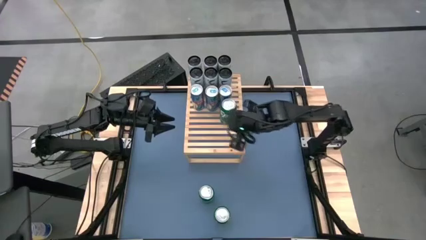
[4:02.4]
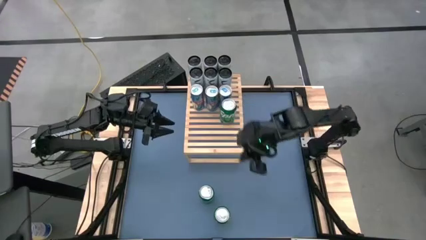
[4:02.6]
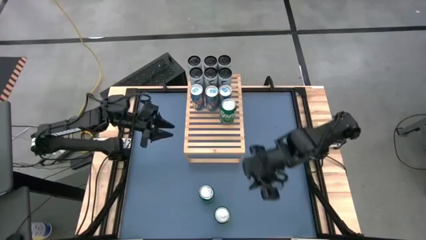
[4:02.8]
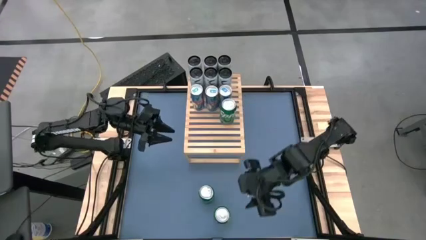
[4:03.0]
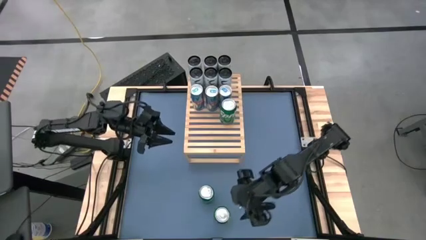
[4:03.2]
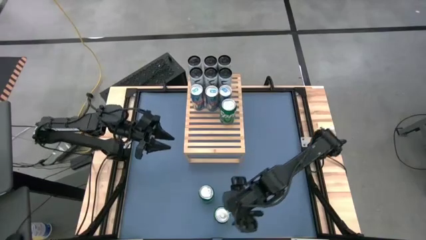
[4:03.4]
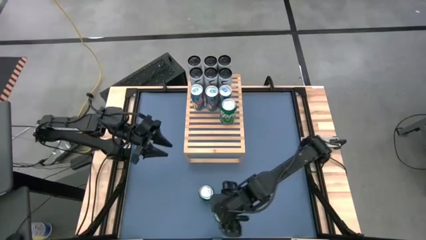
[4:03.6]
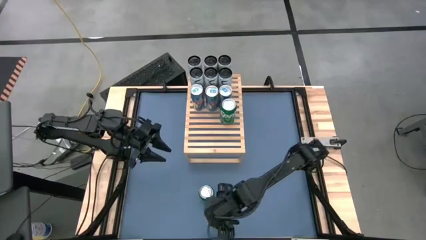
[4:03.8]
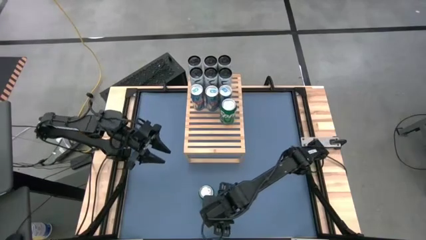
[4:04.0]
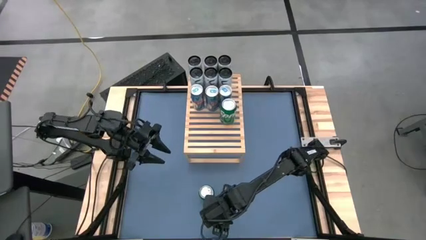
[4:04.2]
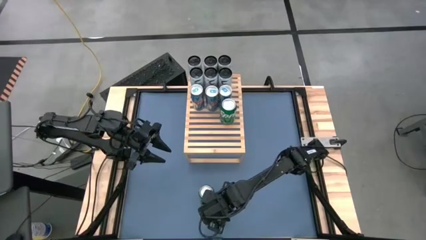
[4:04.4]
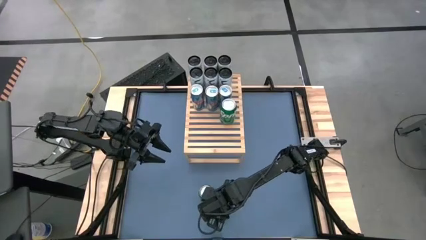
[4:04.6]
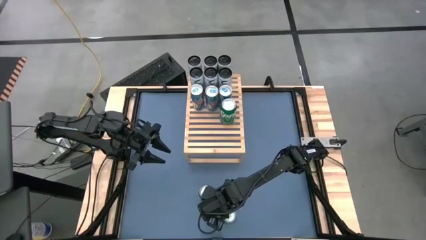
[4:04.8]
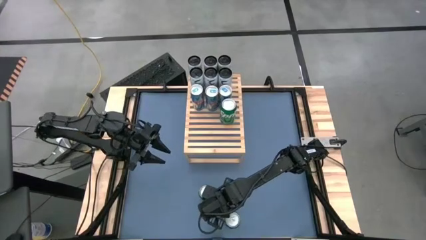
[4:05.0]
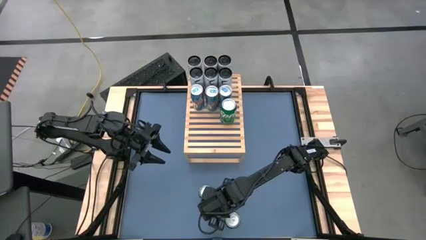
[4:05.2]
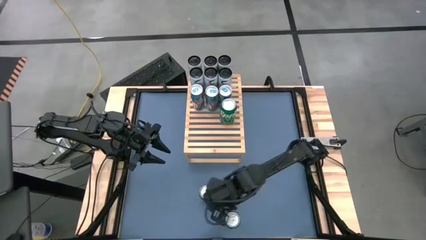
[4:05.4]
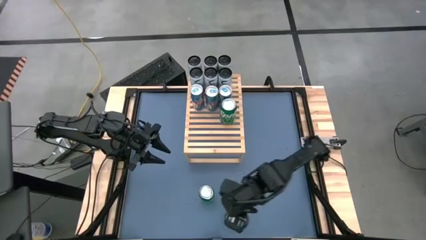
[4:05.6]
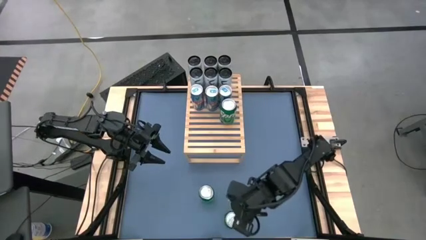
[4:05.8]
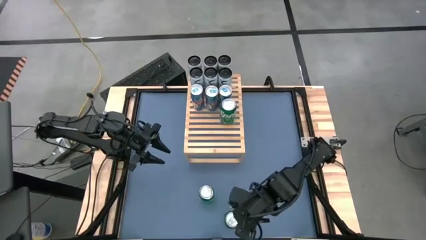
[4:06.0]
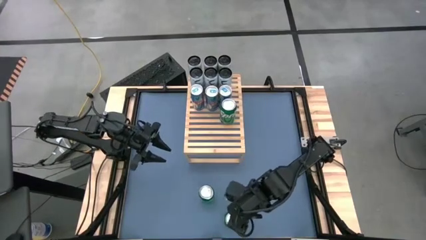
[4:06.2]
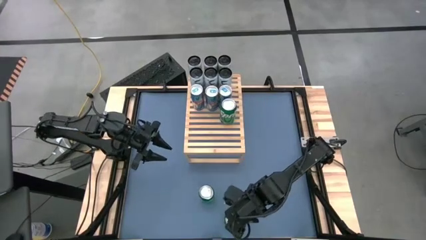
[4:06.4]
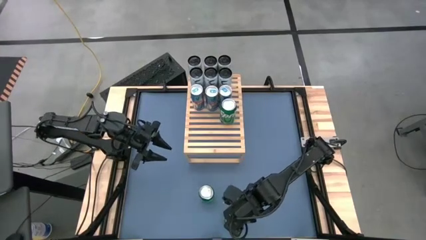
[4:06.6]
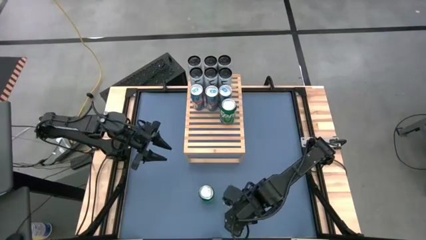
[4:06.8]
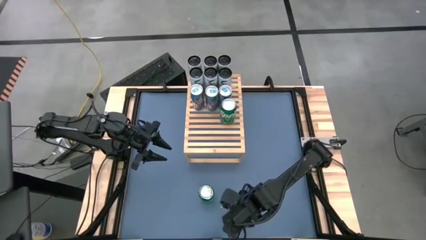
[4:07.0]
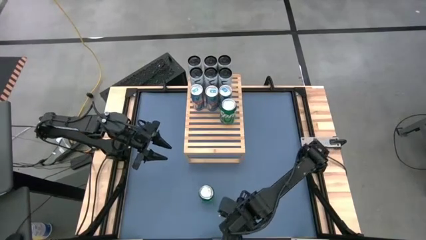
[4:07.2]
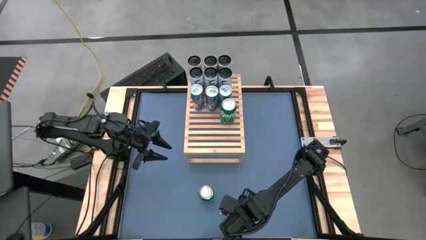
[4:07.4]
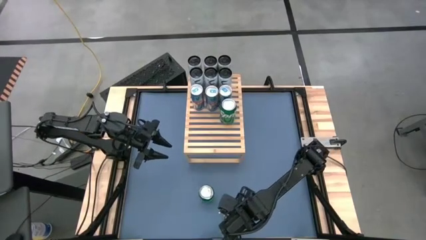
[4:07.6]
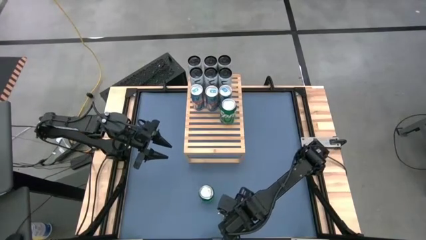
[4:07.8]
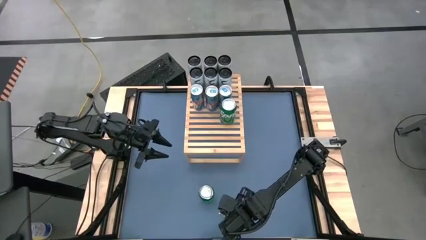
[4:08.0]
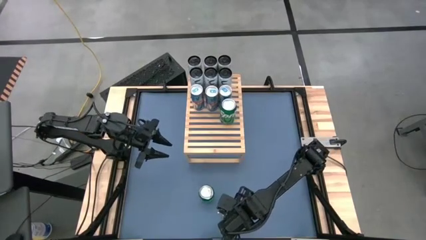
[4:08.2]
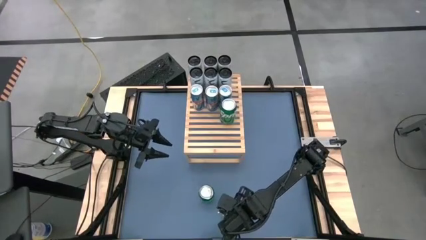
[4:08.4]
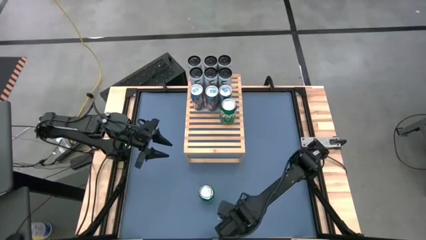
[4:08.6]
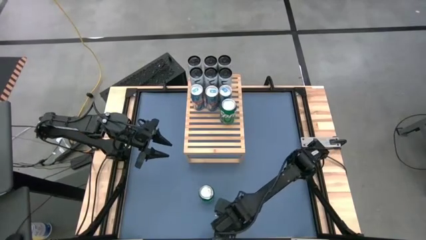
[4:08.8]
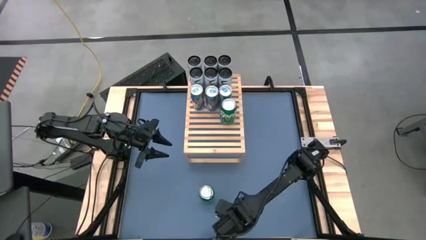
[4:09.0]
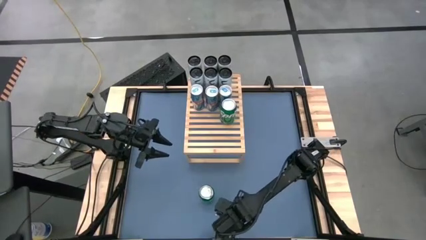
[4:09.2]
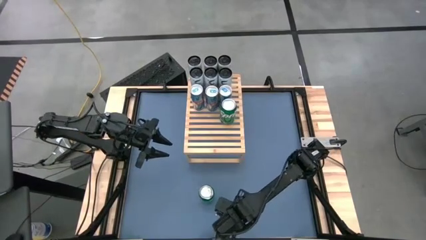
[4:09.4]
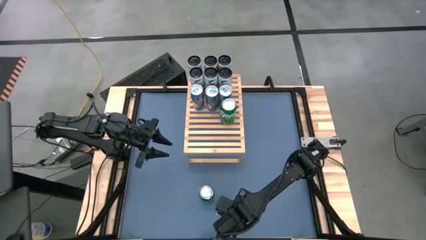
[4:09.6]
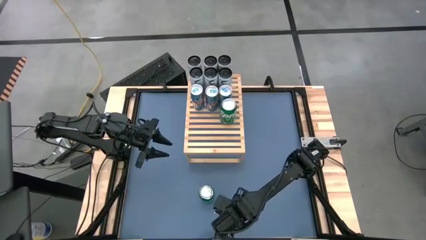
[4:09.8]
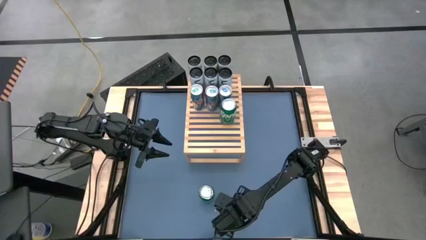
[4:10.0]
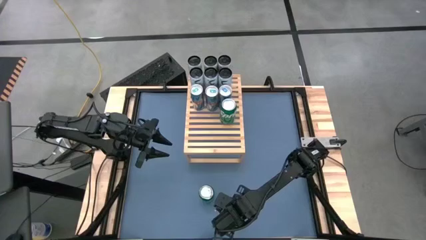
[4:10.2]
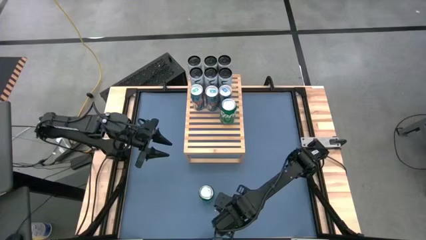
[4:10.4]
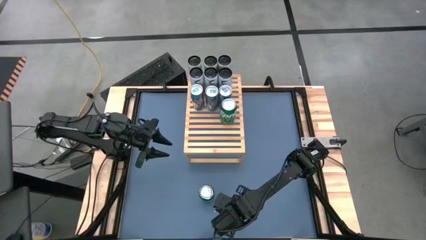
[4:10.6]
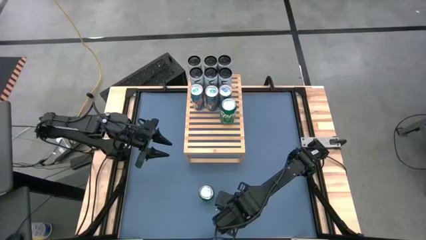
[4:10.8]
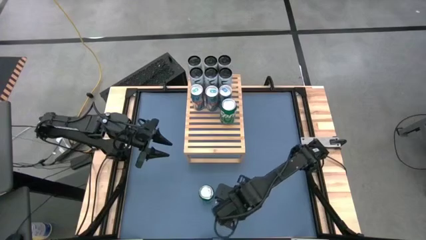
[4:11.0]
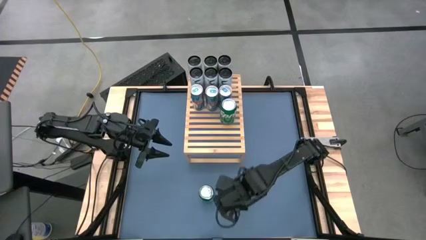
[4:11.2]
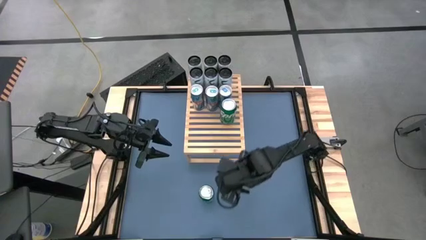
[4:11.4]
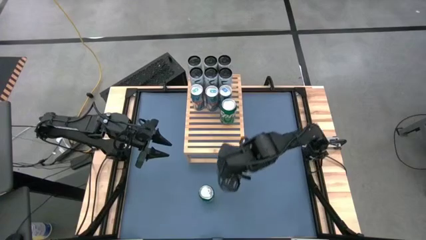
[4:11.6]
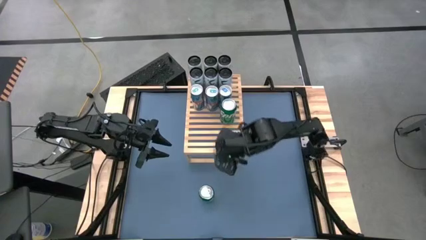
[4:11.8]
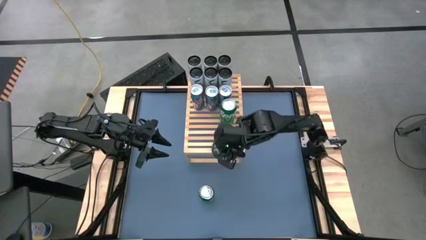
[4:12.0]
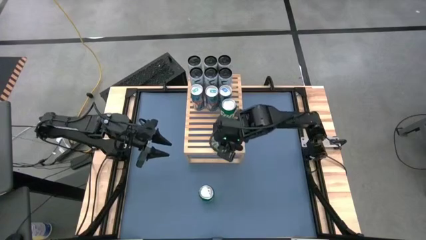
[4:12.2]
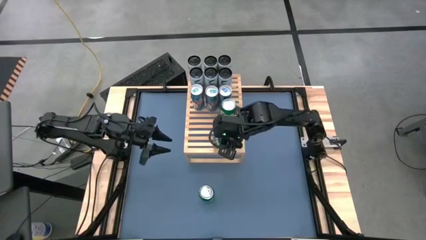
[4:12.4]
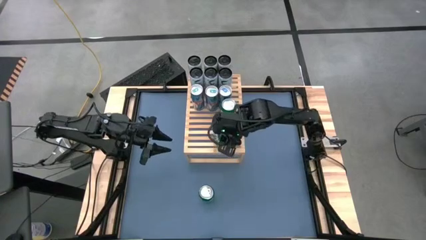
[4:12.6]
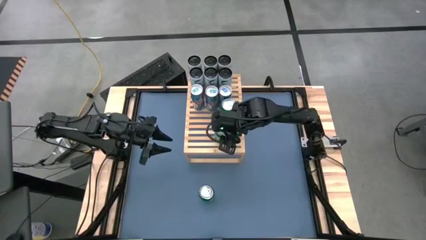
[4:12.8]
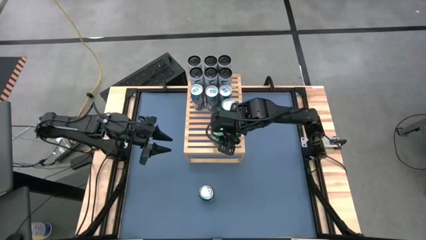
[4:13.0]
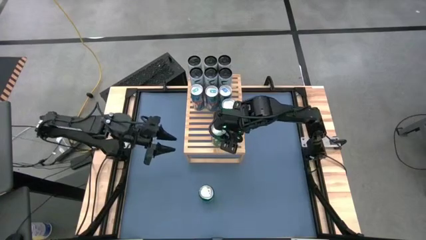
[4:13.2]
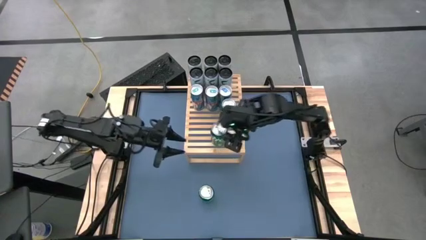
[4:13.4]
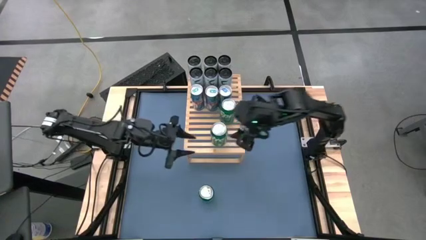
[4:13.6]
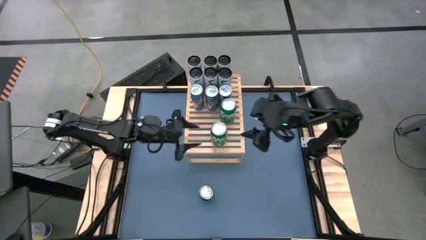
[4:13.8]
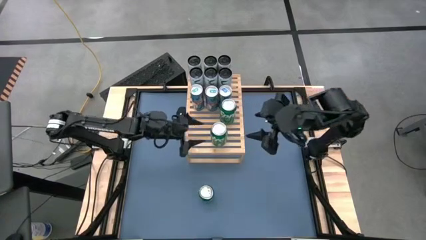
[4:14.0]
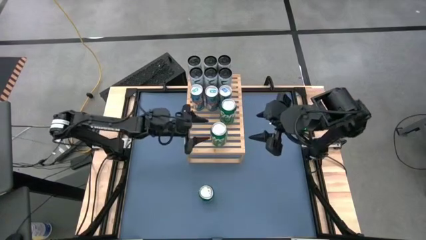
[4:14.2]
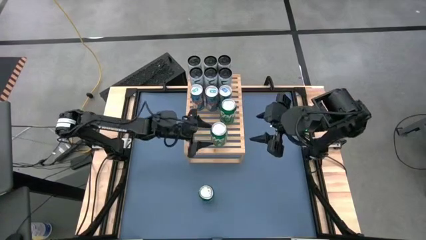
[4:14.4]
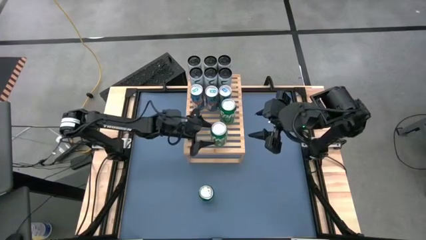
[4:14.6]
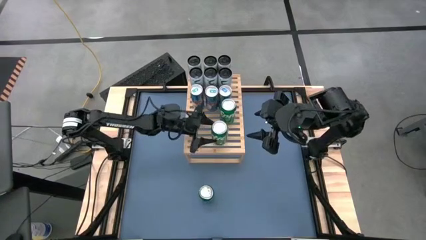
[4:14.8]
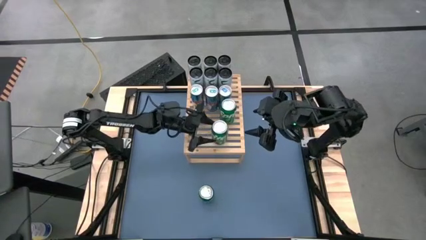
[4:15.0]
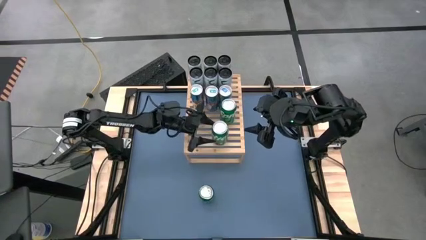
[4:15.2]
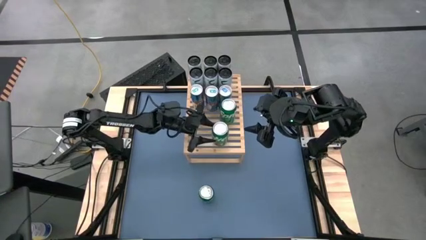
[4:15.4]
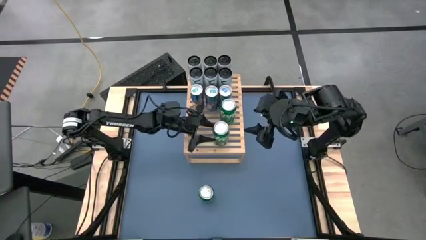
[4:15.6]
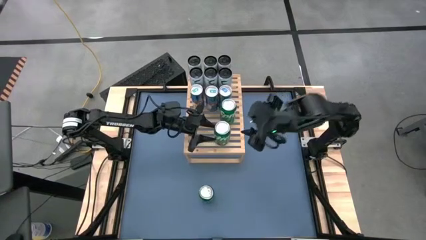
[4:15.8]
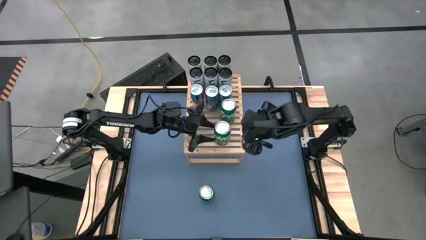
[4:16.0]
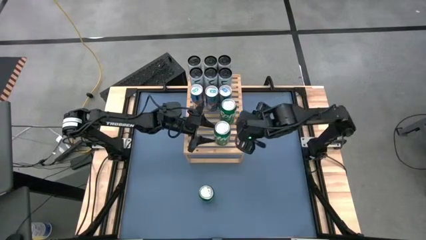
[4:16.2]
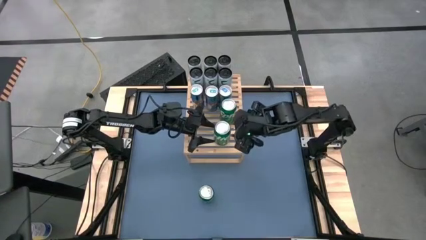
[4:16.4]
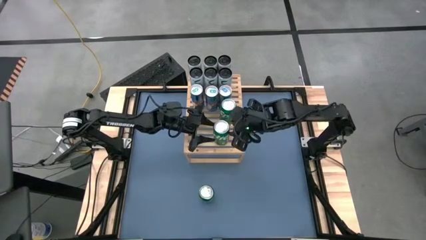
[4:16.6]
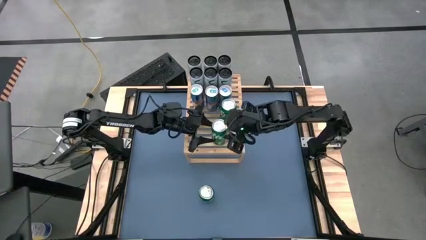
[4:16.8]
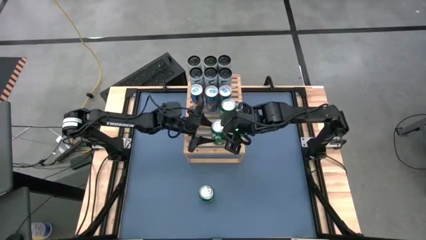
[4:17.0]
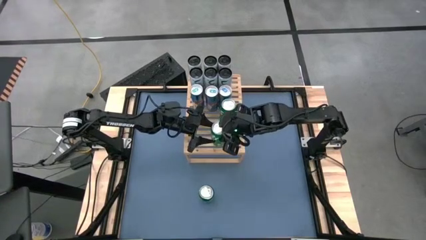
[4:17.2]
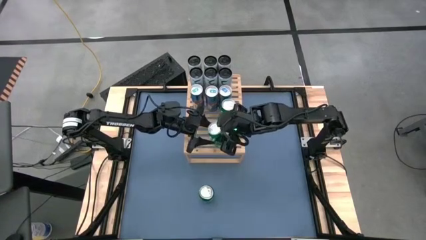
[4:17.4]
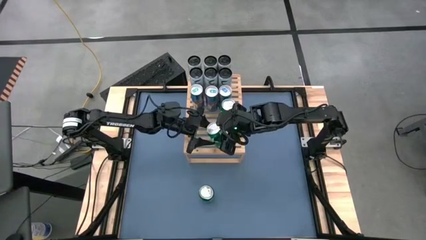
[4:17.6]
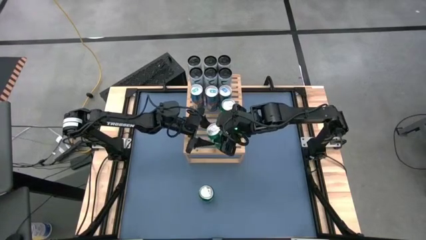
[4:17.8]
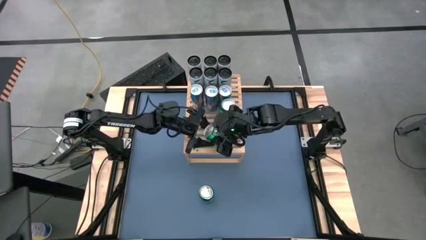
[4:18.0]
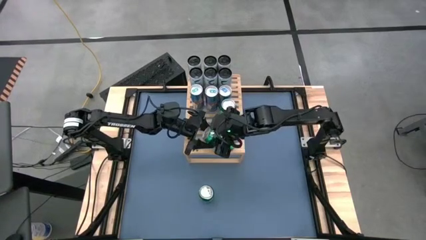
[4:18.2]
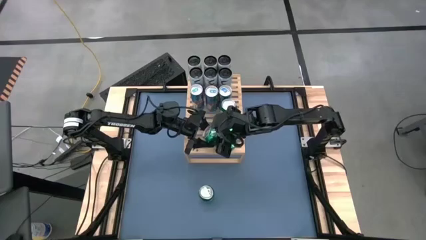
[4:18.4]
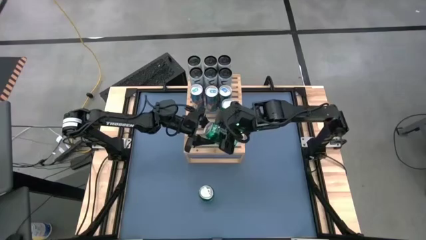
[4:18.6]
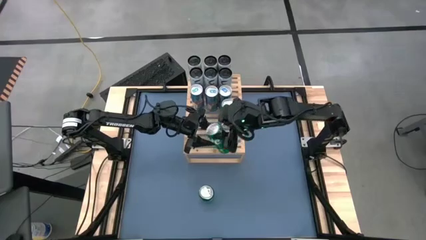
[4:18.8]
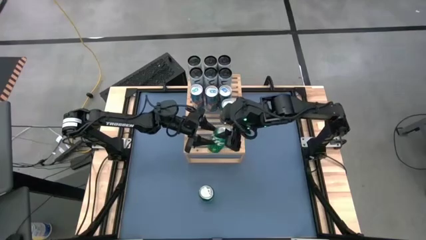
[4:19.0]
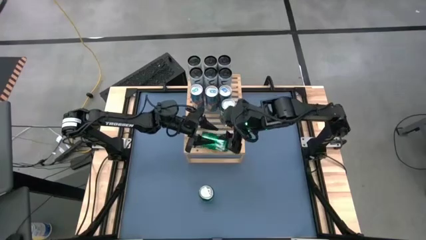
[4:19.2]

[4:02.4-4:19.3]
Task: Place canned beverage on shelf
Put the green soda can on the shelf aligned to the other green soda can
